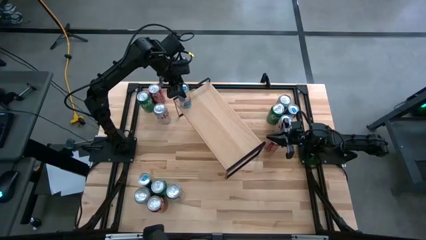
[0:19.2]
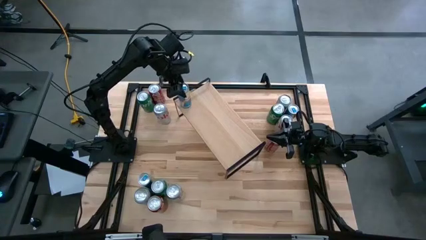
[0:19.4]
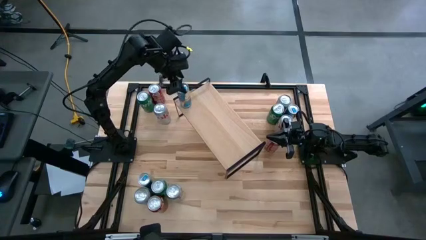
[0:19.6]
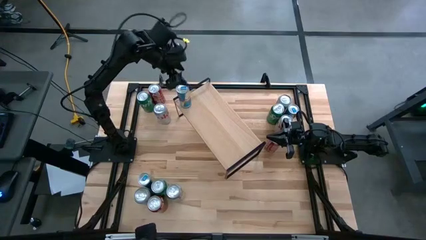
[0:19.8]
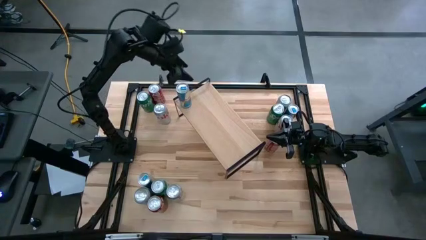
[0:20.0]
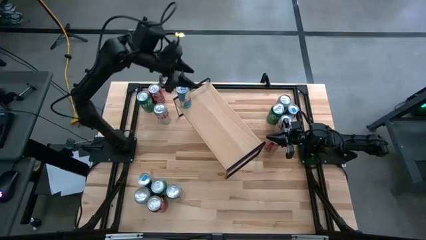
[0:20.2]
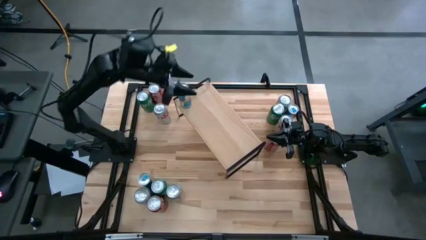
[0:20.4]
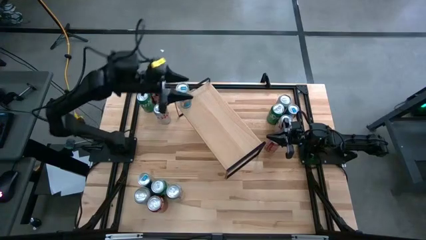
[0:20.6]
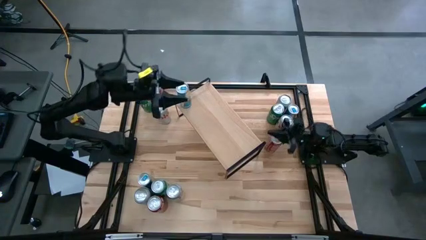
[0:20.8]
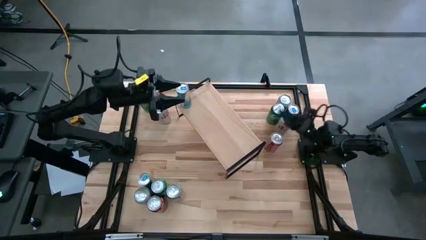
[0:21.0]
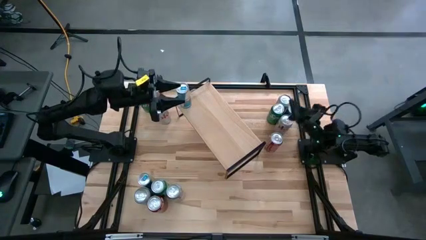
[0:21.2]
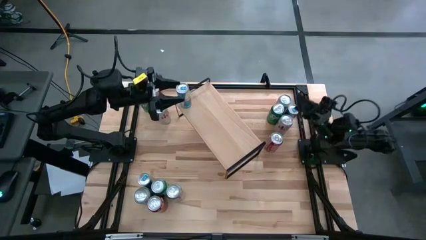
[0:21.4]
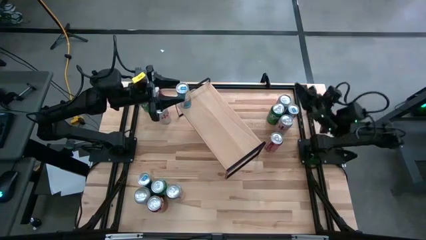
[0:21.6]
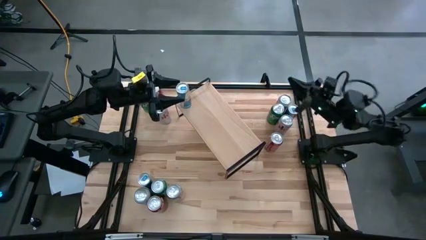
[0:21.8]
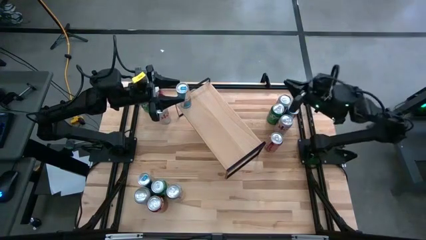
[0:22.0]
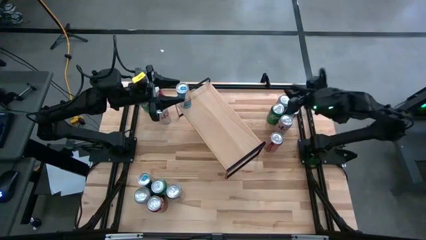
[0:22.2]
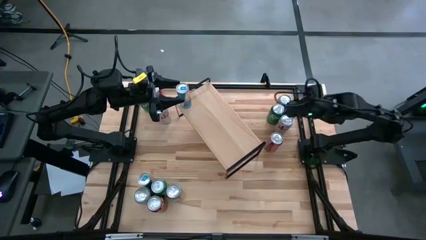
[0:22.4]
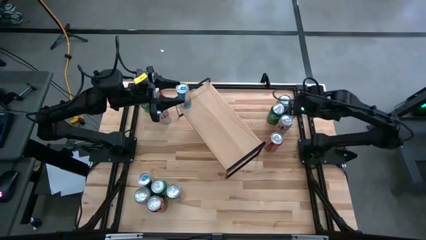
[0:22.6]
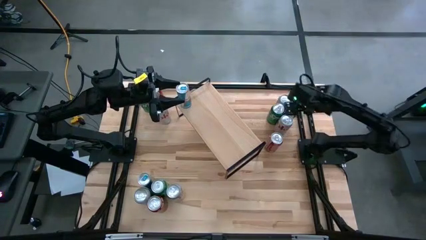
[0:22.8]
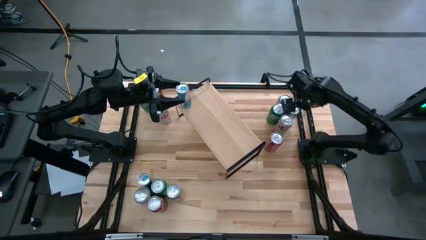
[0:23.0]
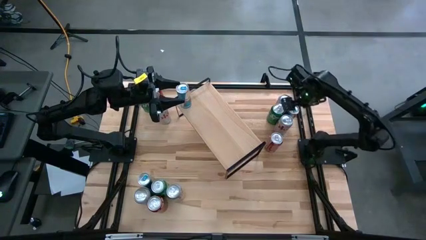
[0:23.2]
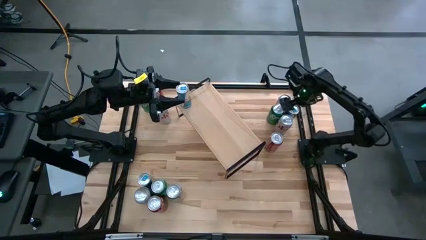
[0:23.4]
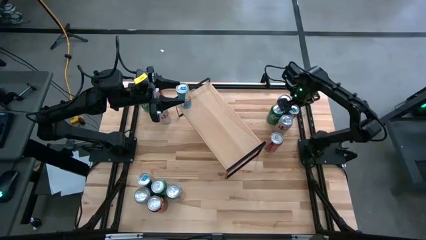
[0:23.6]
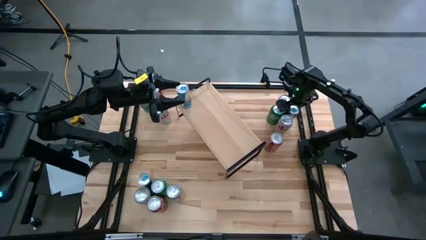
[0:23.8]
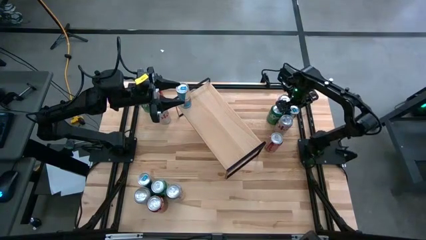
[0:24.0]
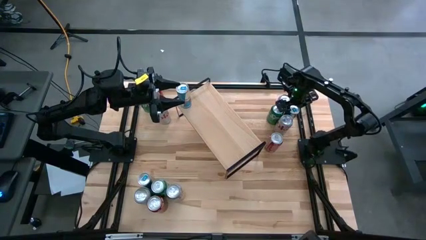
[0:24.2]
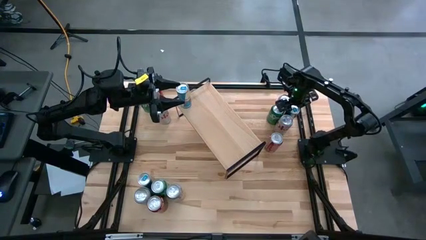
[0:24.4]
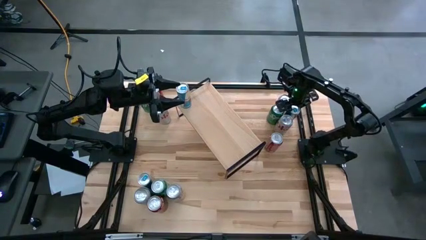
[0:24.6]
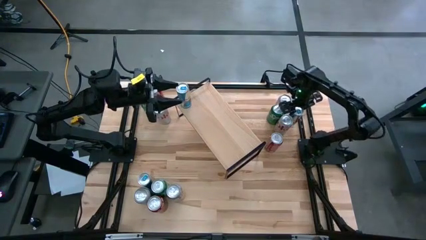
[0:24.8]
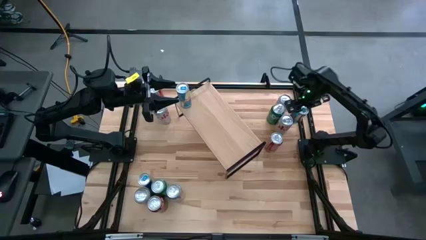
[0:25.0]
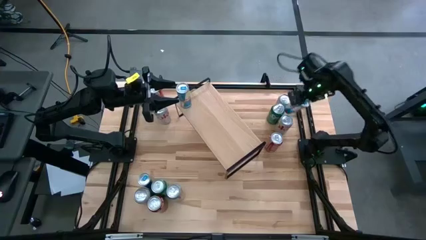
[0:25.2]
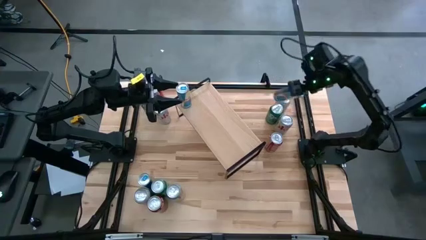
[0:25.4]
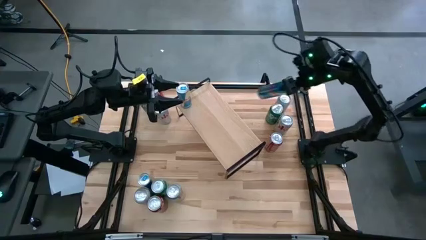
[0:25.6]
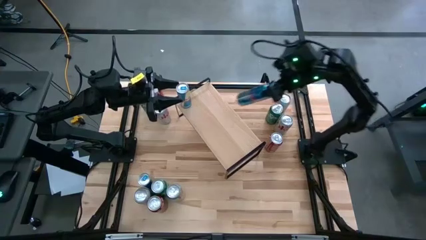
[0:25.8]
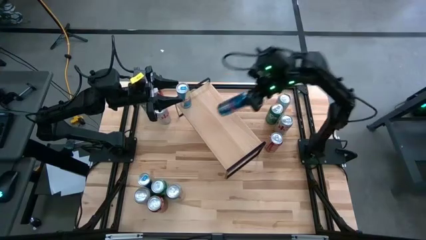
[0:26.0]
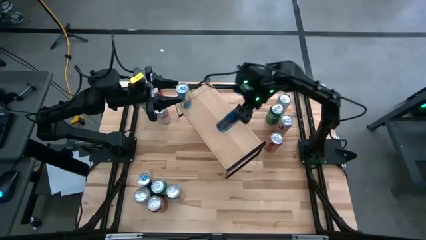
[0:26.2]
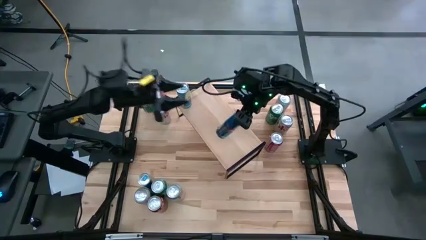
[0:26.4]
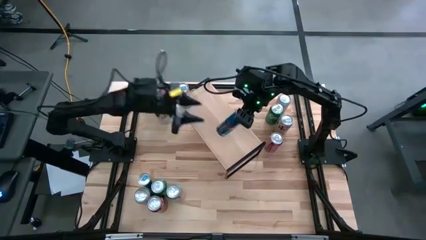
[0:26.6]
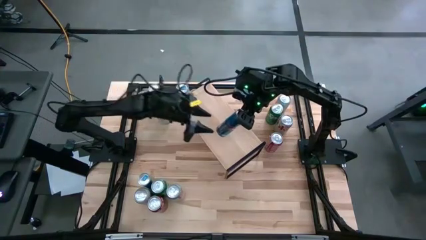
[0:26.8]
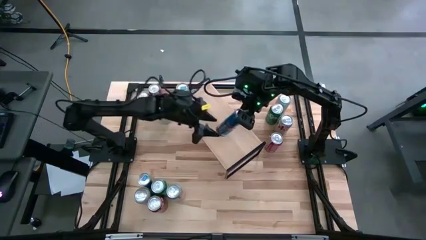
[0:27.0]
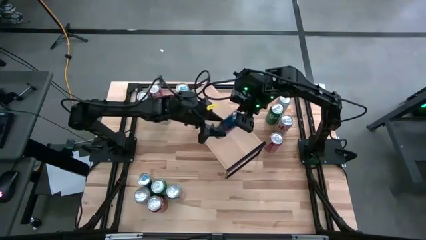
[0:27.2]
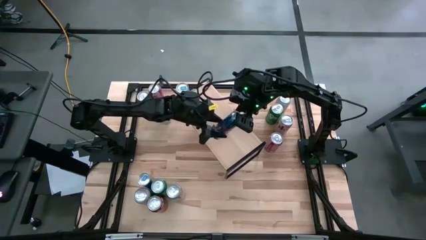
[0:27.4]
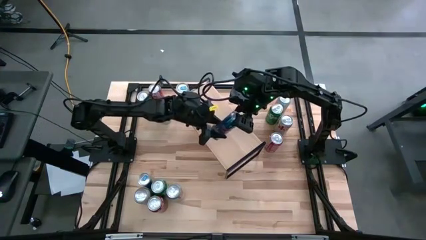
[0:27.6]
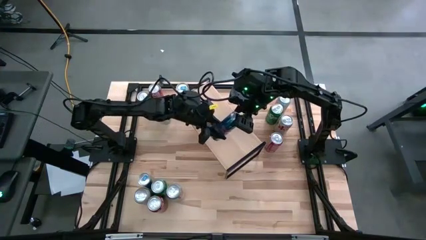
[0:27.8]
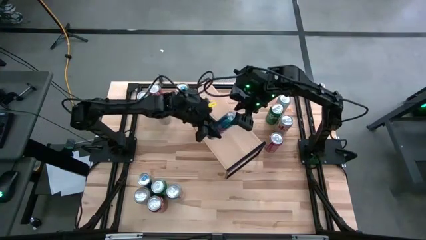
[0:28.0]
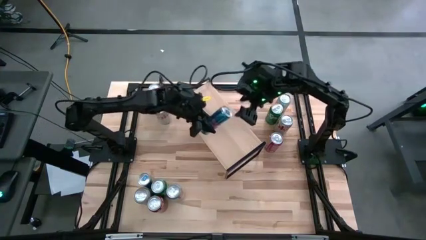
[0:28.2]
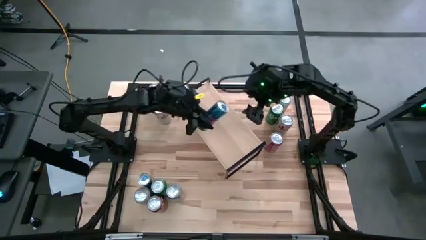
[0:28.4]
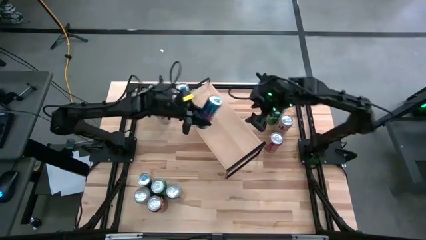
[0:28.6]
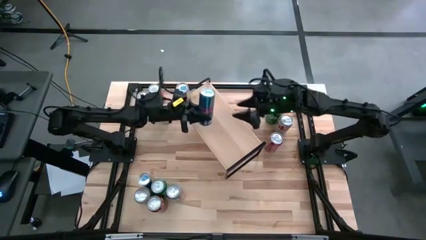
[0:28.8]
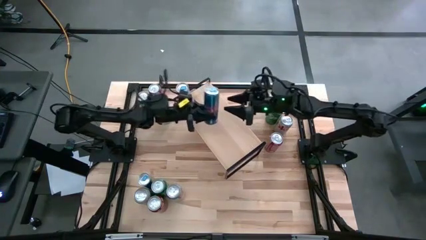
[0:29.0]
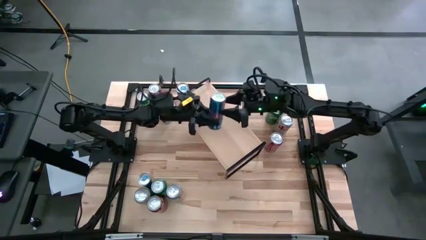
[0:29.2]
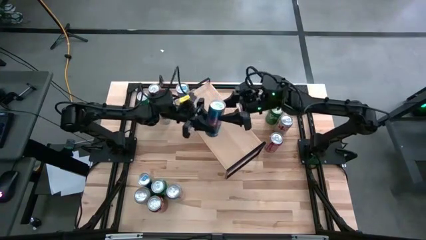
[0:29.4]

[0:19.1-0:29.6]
Task: Place canned beverage on shelf
Put the top blue soda can on the shelf aligned with the other blue soda can
